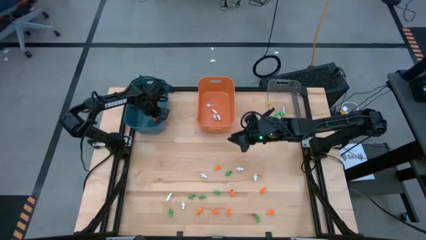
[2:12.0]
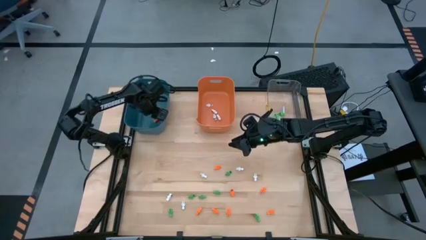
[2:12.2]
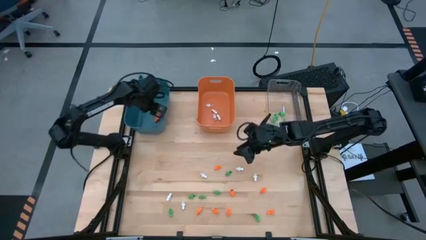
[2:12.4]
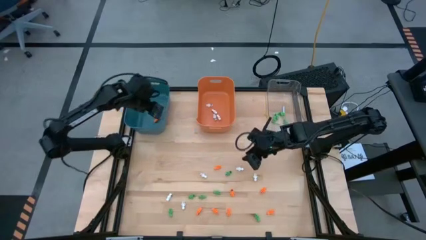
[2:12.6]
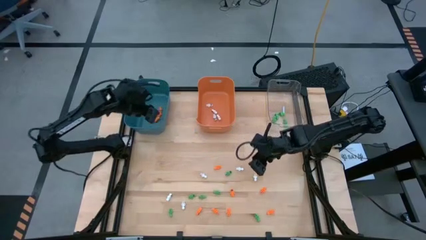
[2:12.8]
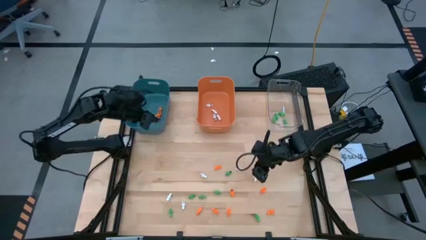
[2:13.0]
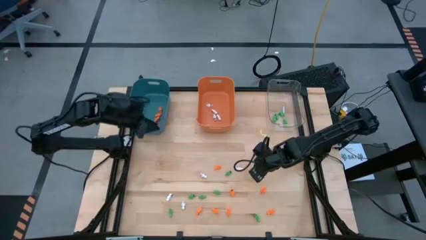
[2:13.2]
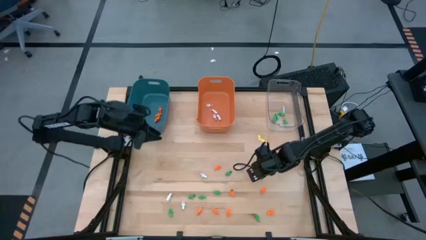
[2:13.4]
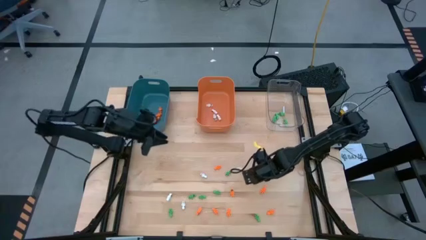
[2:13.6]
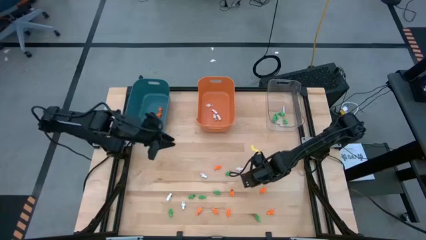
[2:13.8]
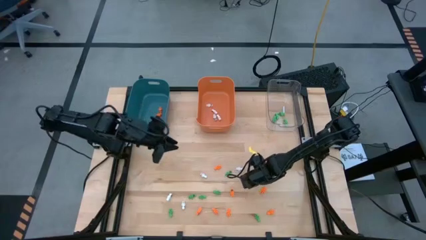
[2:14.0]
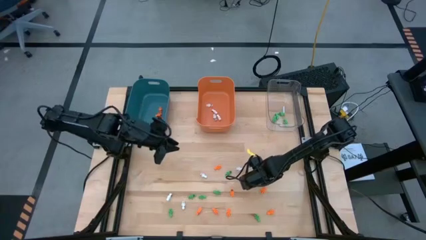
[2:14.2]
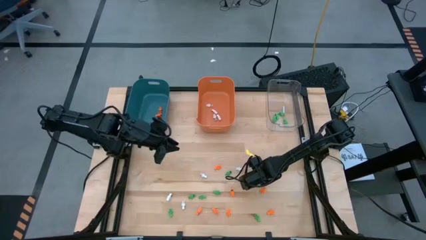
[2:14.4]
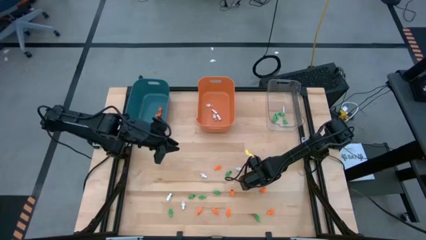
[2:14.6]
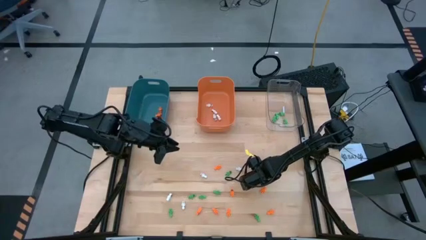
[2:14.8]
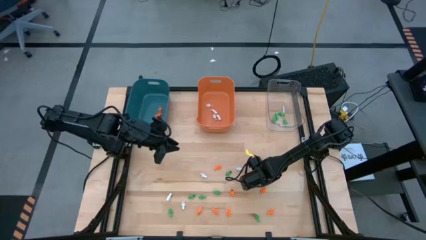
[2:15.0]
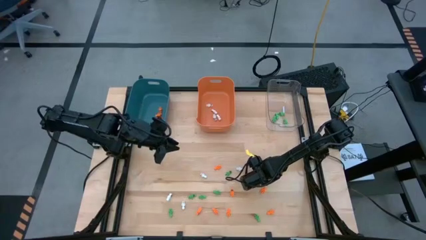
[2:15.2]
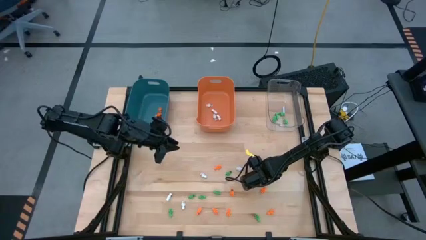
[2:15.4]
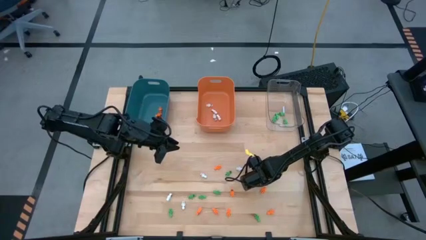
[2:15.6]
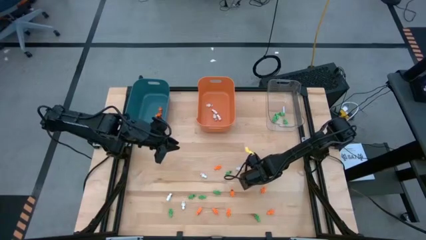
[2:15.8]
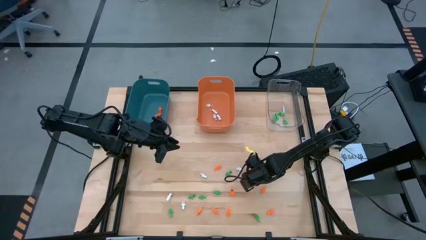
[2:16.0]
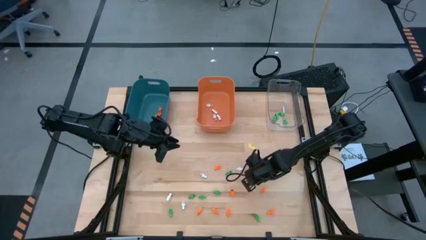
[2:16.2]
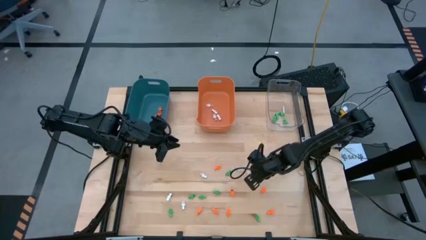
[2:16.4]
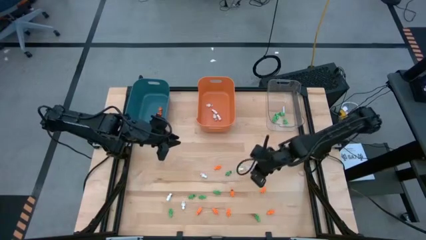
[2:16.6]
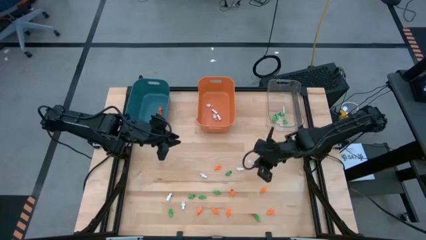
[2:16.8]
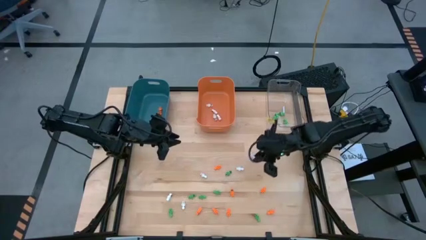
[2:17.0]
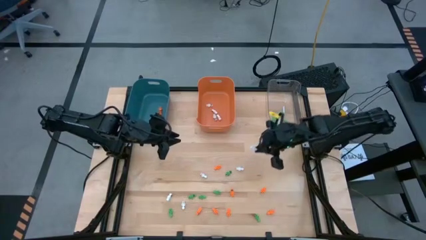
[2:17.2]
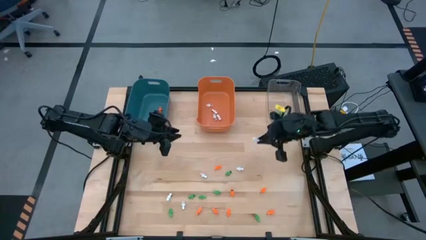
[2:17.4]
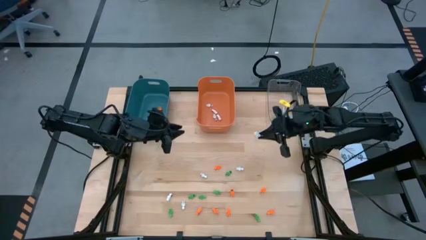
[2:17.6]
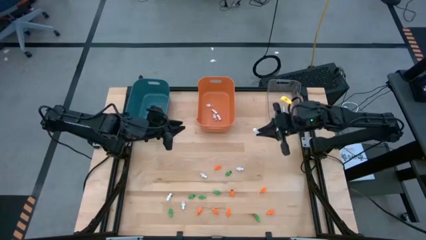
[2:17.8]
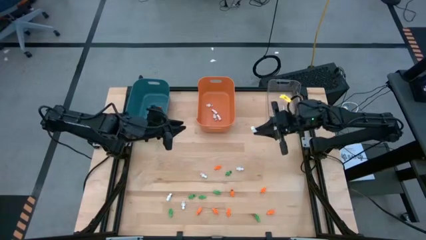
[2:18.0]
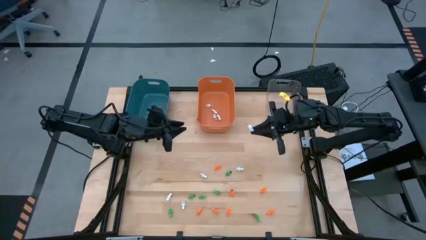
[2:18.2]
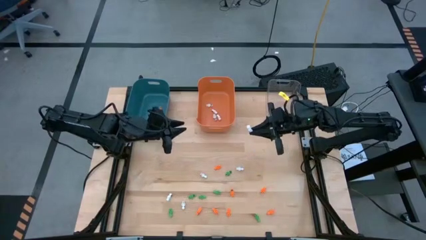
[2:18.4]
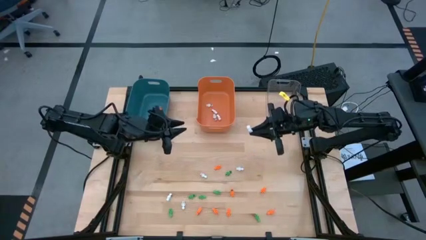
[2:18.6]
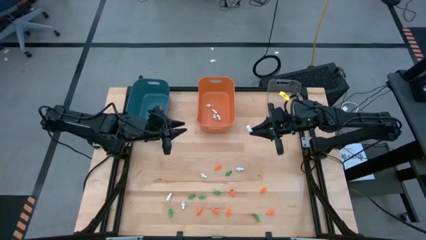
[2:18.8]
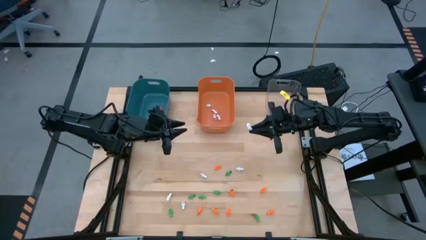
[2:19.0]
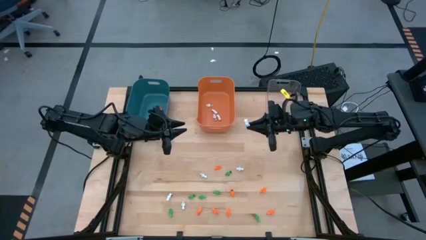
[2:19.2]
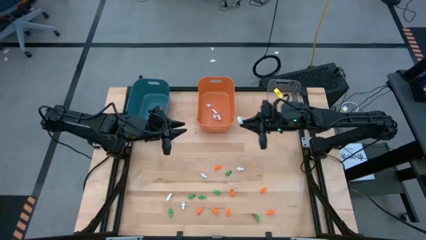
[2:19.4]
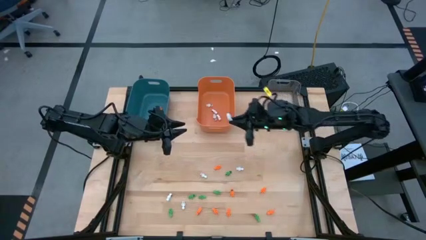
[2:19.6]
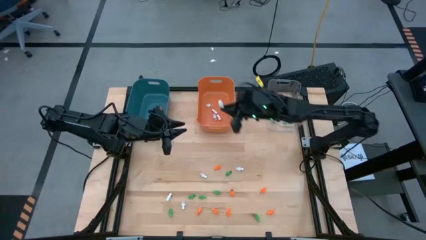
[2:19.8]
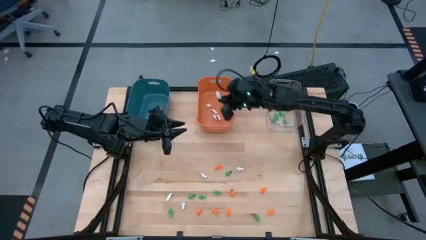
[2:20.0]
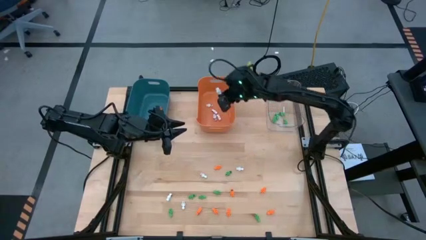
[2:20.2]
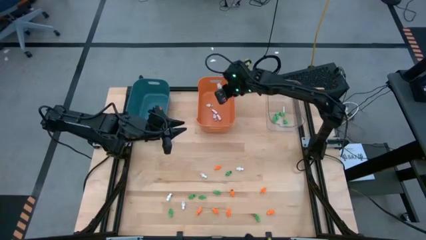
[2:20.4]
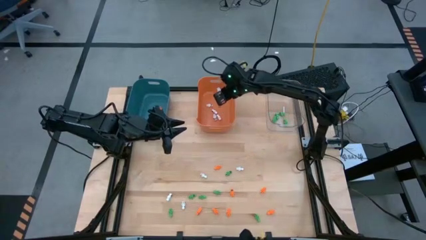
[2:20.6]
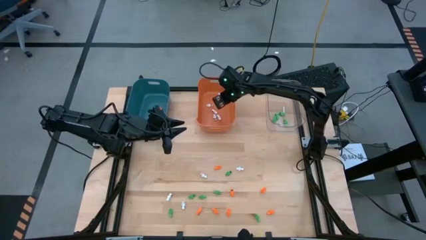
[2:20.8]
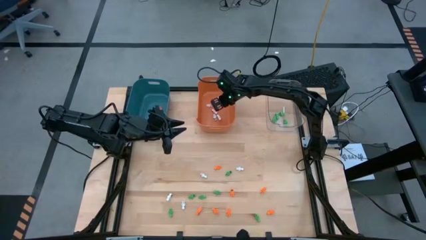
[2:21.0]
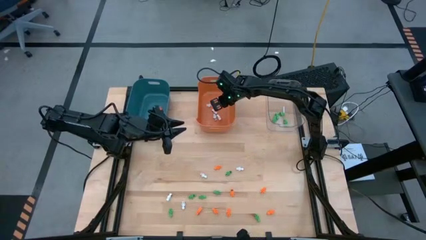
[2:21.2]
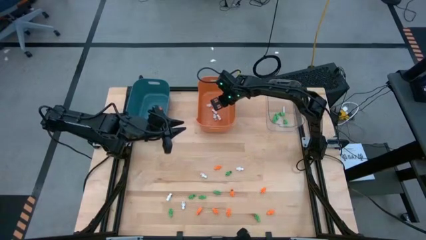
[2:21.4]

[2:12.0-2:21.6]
Task: Sort Halloween decoration
Put the white skeleton toy into the orange bin
